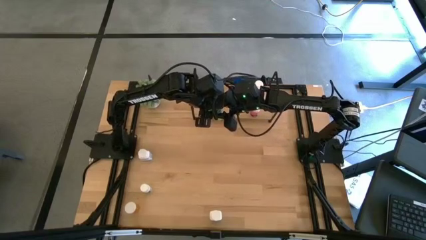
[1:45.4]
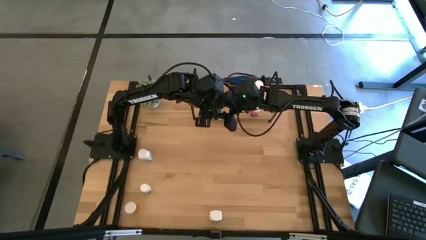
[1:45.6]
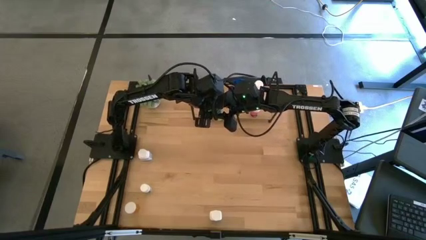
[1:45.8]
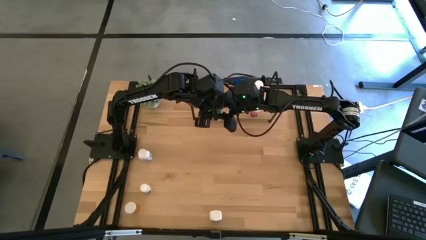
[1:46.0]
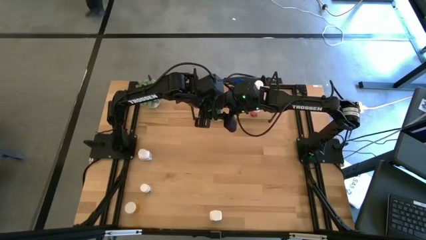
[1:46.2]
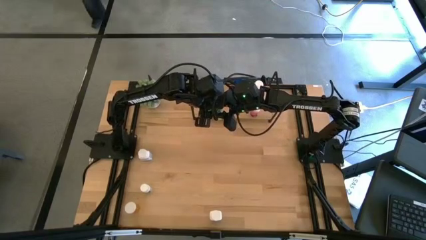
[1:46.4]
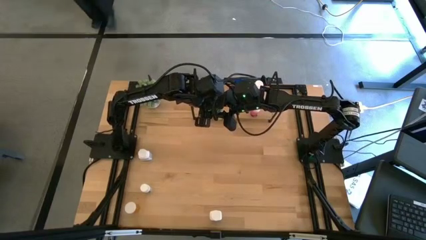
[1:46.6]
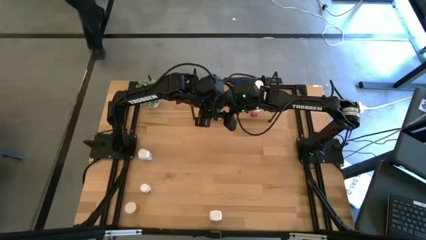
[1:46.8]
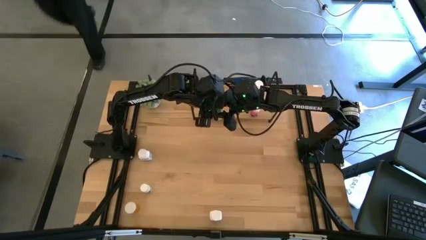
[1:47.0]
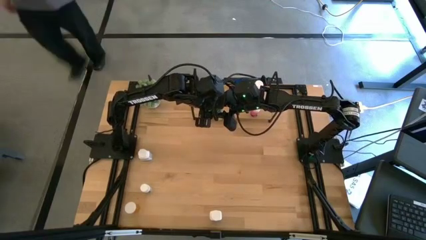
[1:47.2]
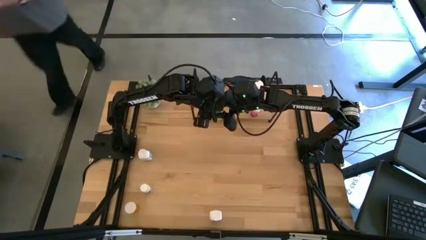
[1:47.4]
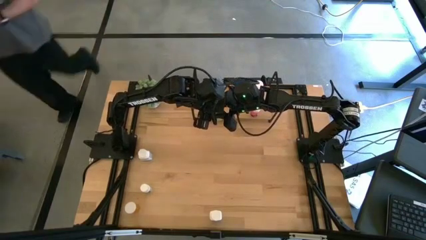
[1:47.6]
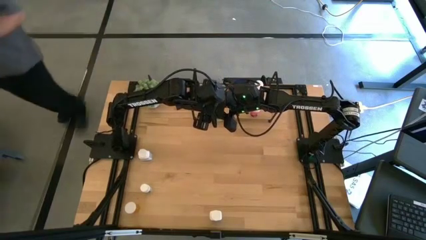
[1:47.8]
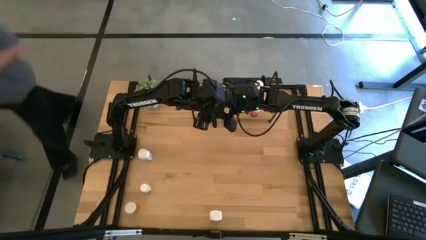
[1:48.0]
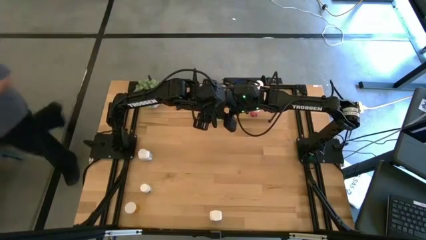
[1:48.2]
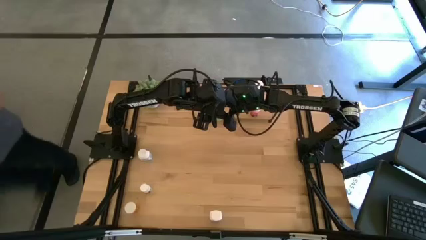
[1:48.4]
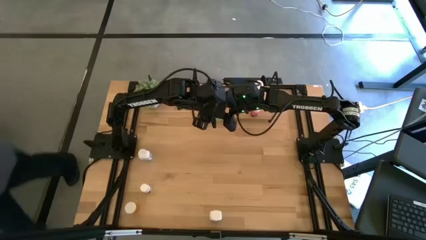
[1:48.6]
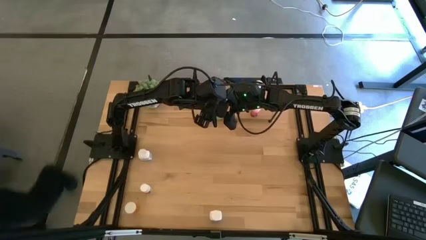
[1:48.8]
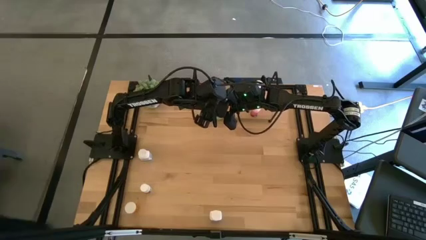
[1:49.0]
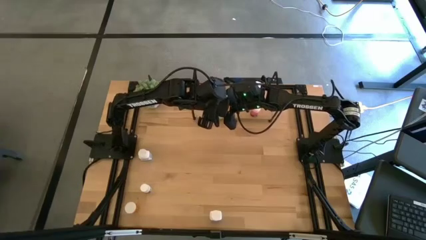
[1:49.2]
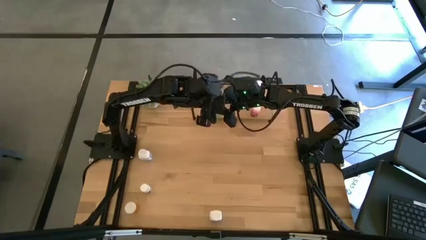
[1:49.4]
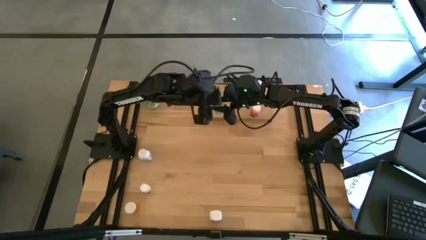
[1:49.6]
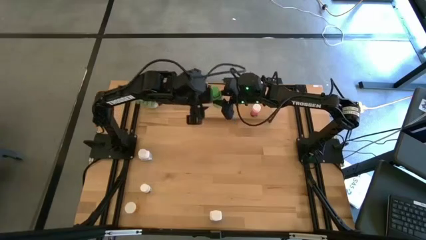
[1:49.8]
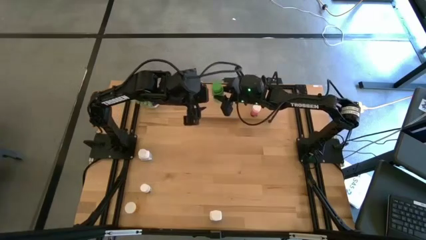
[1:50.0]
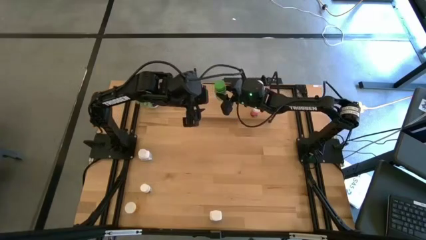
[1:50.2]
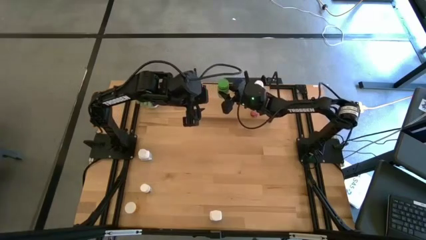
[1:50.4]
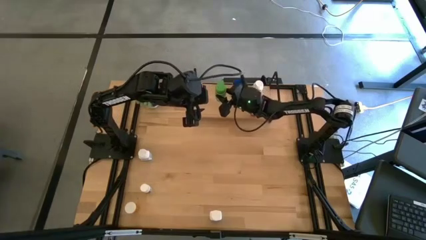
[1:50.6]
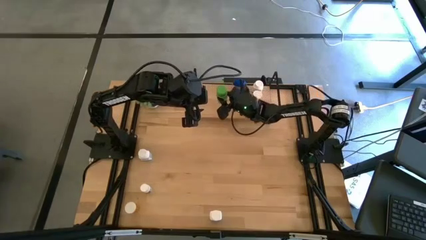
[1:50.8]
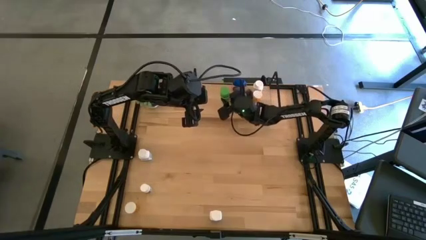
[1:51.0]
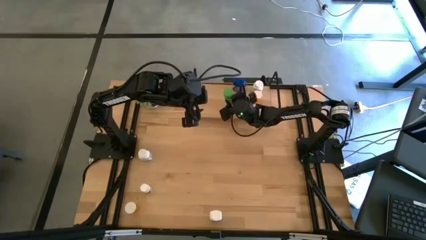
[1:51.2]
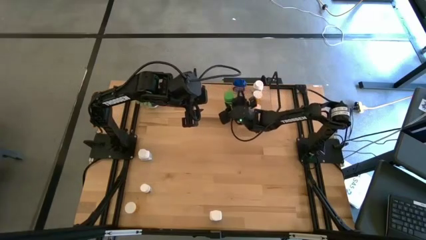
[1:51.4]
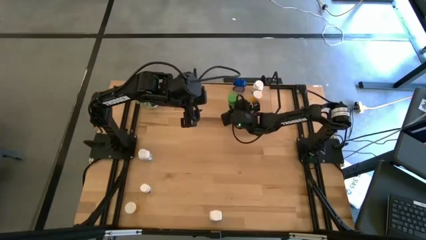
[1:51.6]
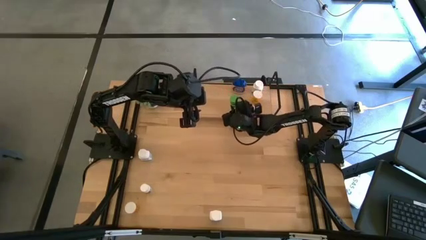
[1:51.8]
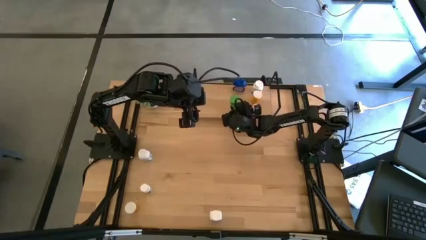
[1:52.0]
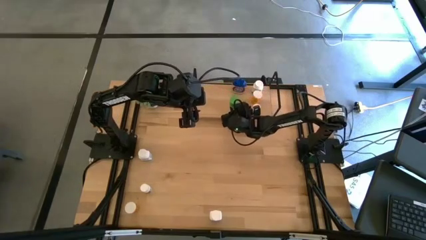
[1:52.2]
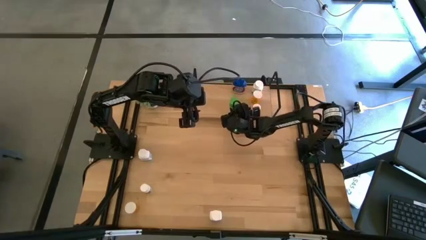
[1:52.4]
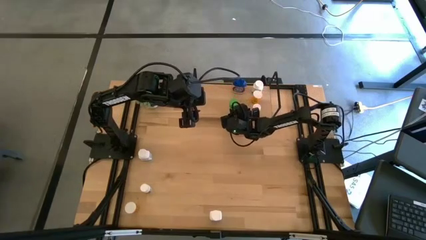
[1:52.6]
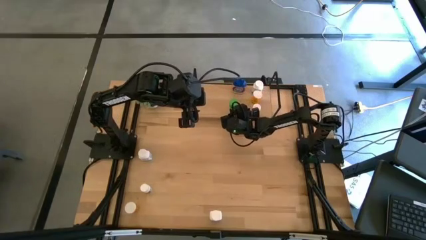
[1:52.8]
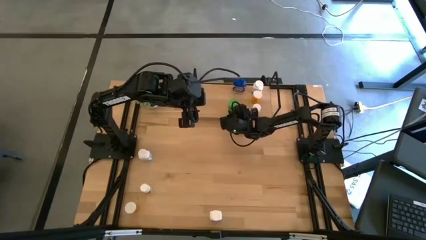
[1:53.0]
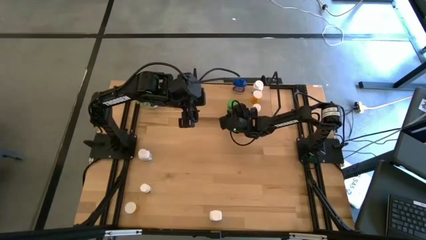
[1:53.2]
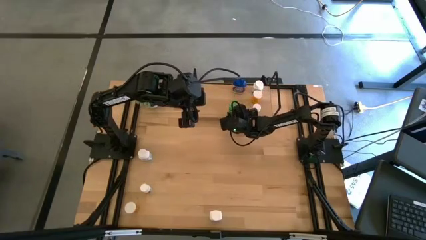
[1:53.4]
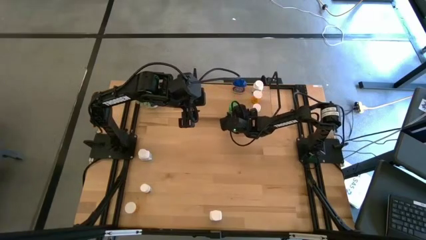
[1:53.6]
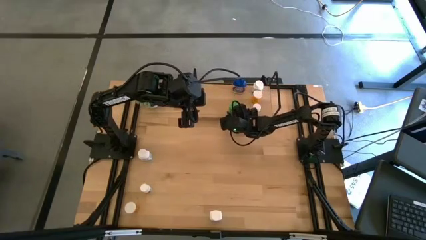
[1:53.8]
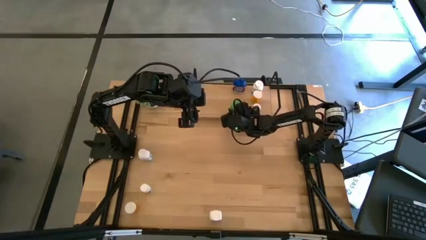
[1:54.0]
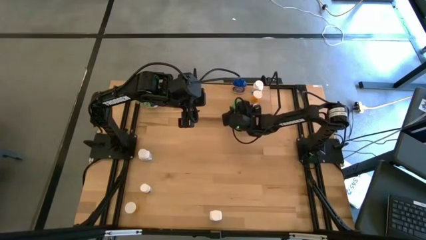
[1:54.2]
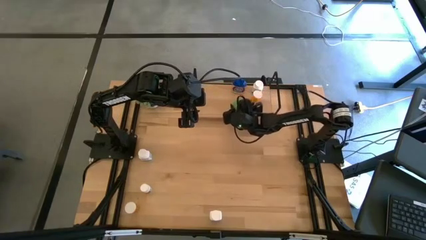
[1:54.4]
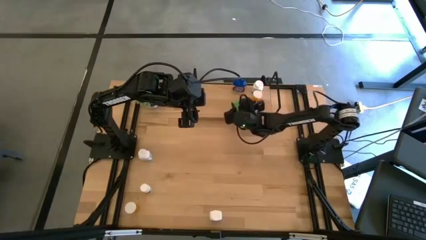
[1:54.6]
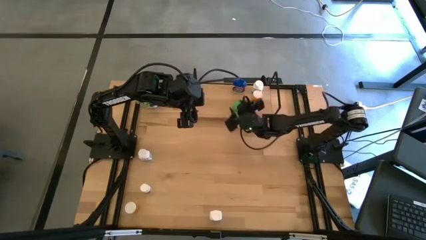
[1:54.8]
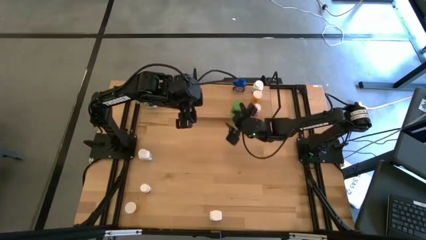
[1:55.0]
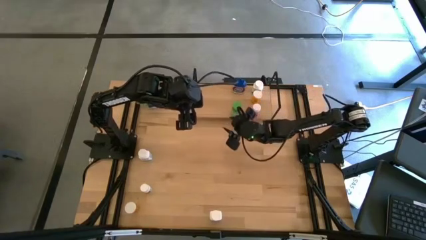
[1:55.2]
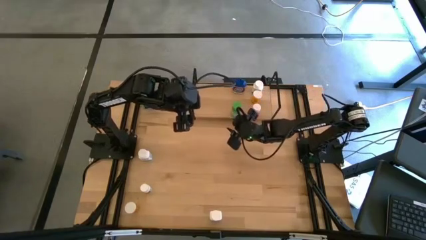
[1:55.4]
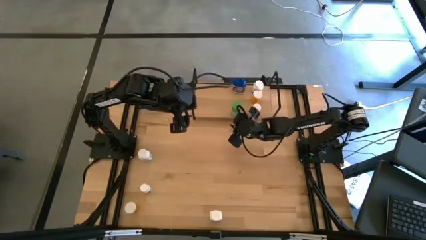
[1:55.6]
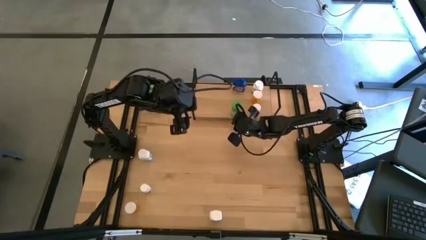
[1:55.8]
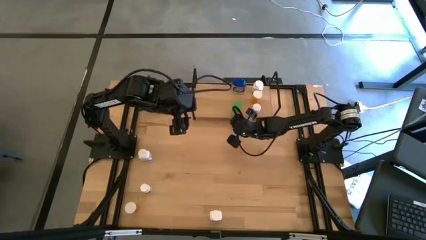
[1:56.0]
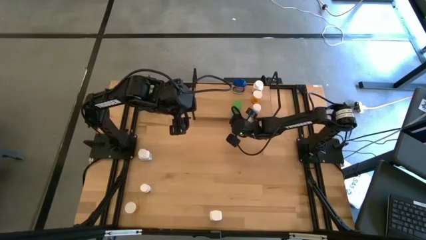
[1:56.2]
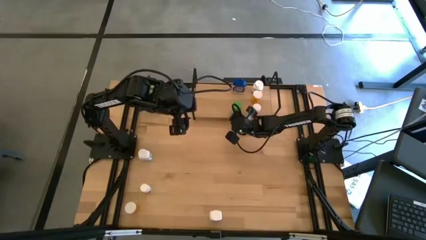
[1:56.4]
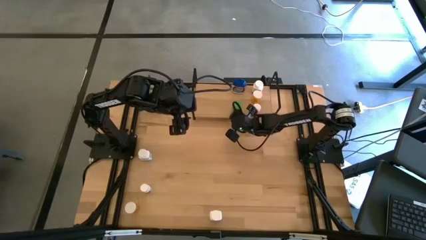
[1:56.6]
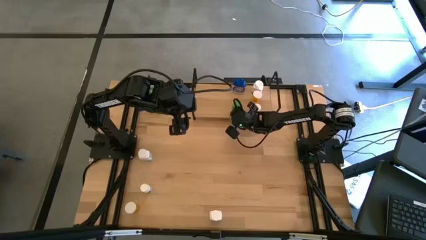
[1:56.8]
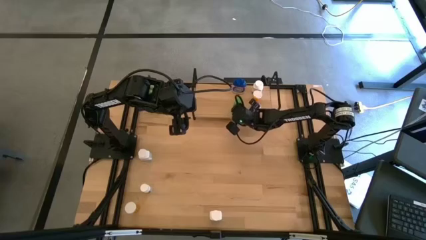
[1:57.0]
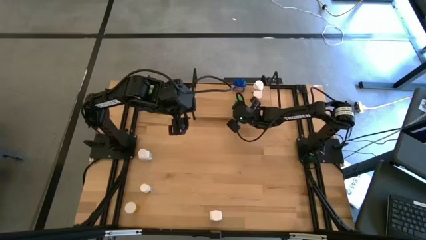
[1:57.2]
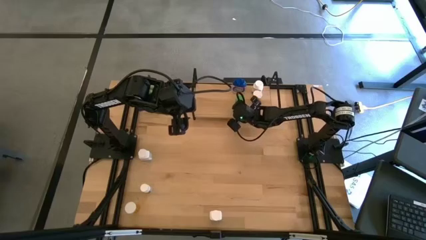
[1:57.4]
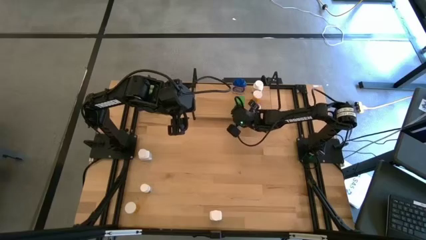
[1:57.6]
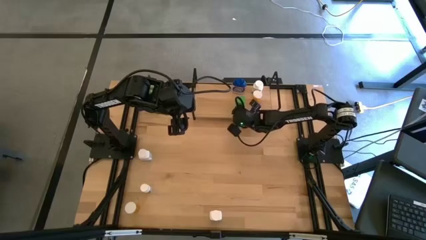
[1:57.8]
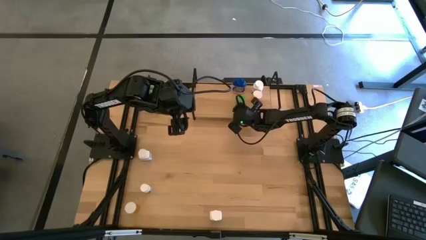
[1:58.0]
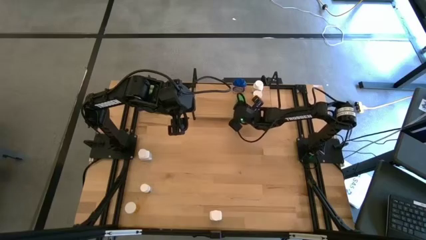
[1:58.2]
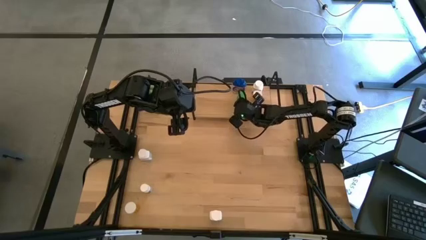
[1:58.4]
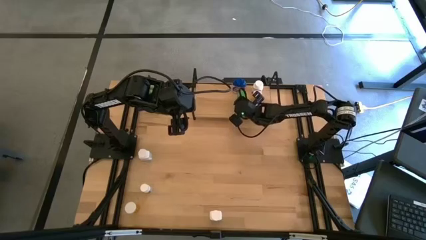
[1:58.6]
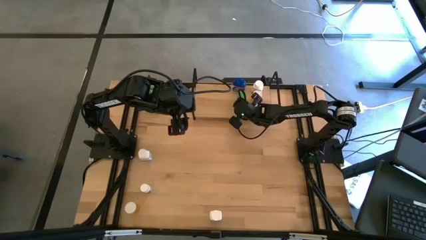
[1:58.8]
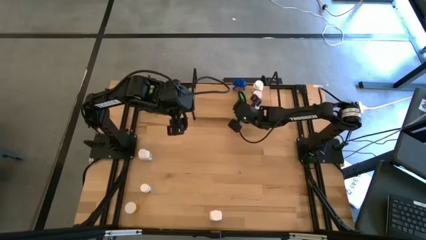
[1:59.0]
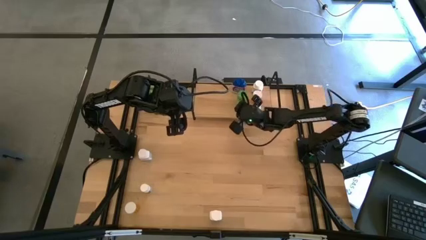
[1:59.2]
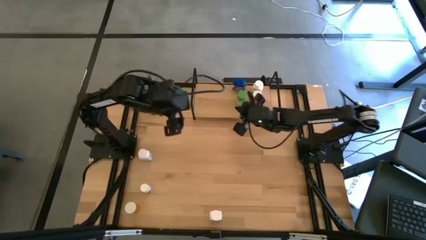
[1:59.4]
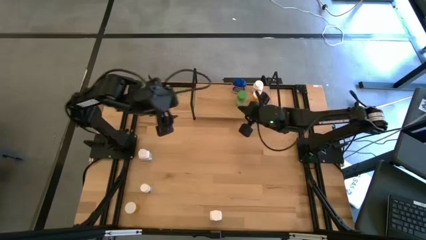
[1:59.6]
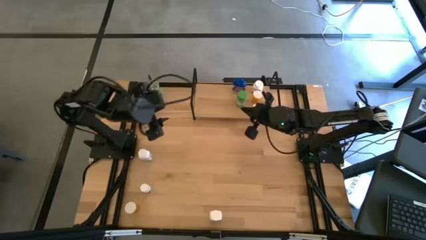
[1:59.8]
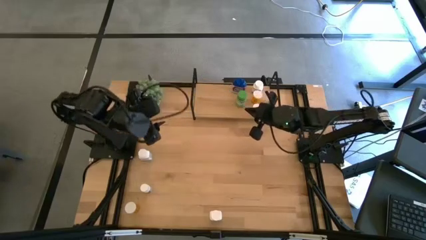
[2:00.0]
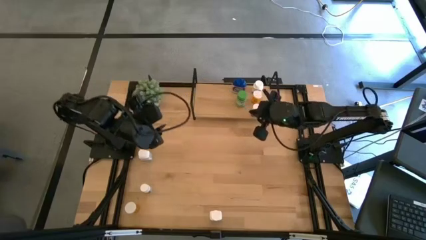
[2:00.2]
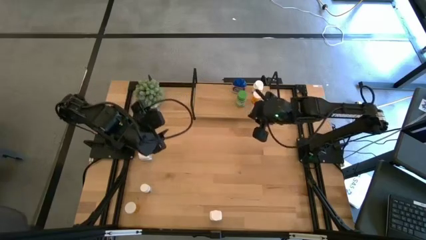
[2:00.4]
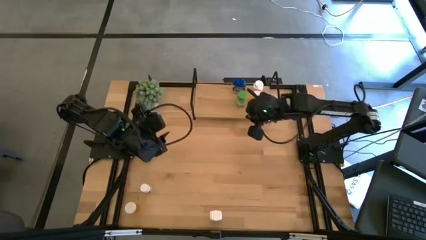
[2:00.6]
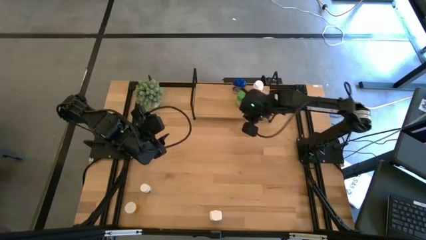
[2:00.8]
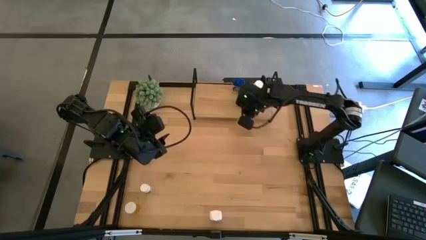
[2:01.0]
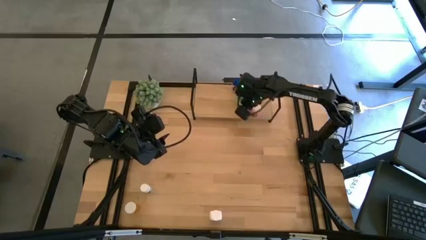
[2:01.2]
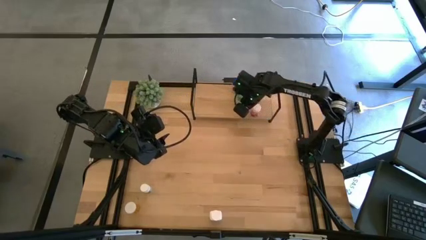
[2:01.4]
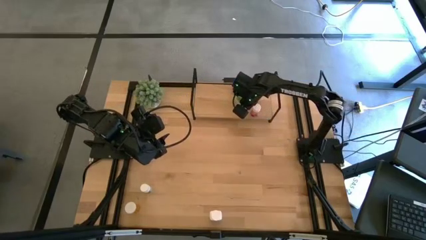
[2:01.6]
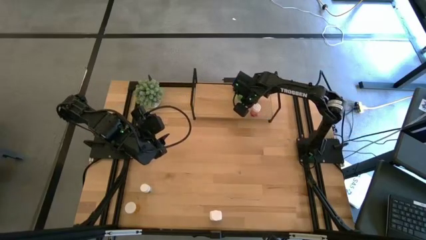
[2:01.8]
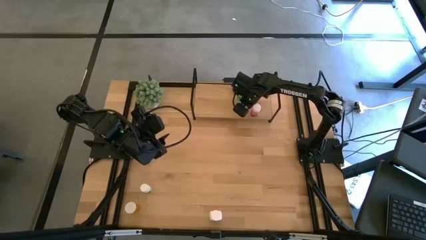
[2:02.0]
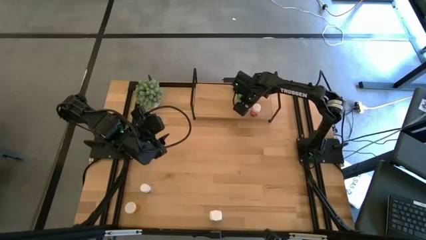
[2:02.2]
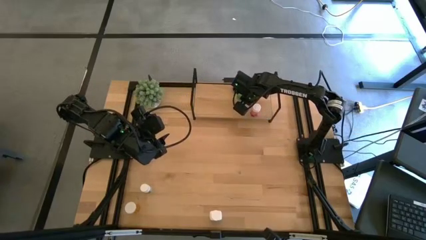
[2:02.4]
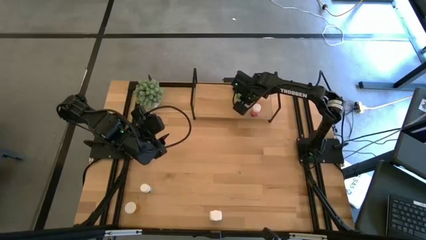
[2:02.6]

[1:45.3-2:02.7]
Task: Pick and place medicine bottles onto shelf by color
Put the green medicine on the shelf
